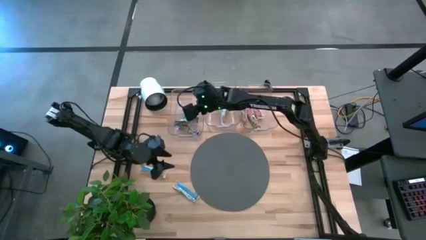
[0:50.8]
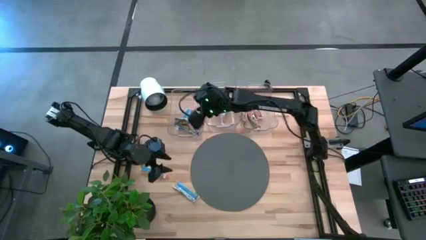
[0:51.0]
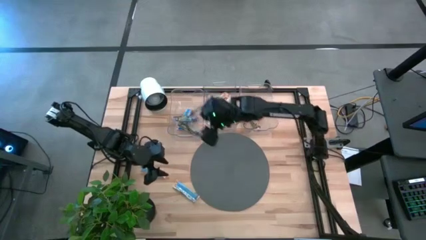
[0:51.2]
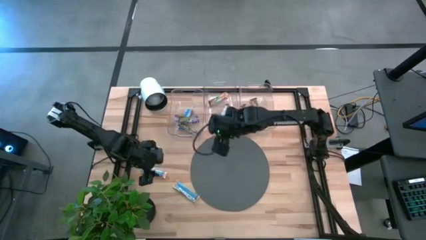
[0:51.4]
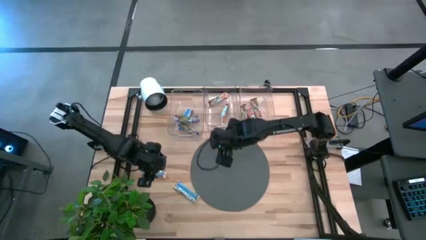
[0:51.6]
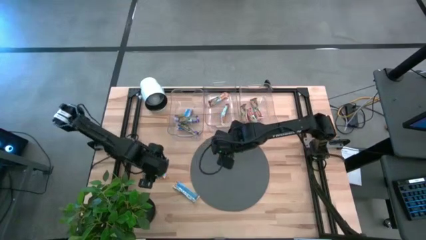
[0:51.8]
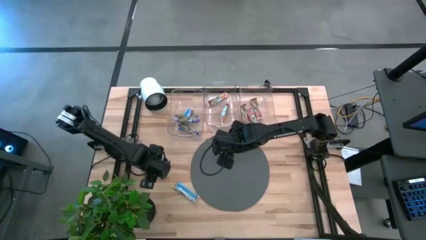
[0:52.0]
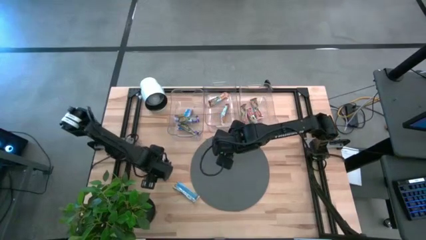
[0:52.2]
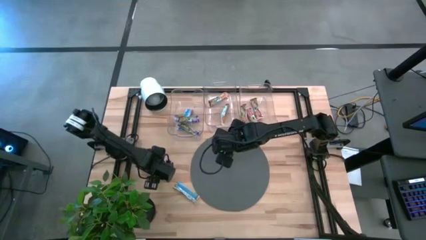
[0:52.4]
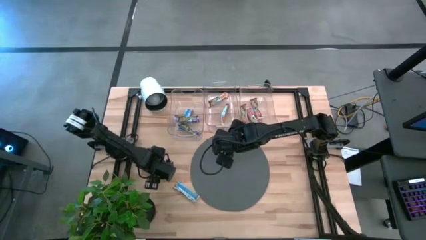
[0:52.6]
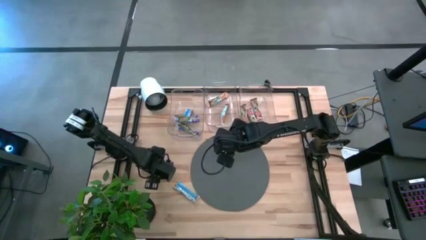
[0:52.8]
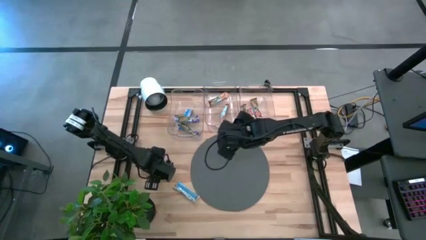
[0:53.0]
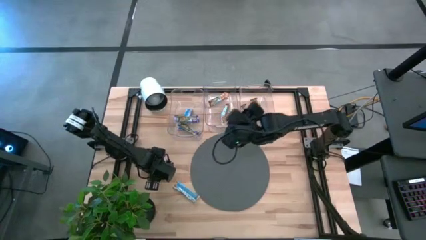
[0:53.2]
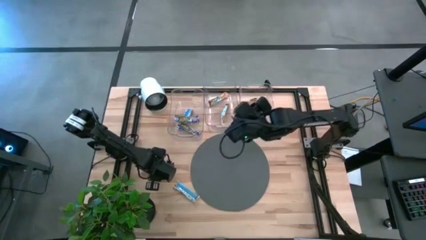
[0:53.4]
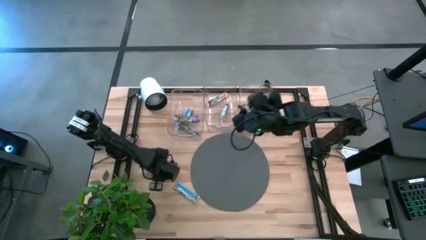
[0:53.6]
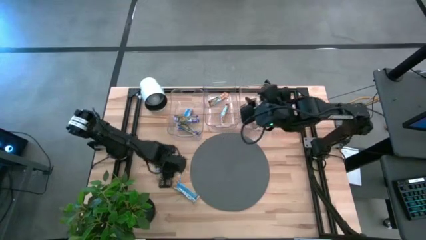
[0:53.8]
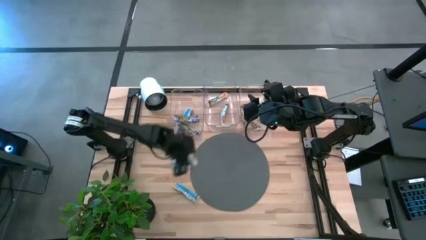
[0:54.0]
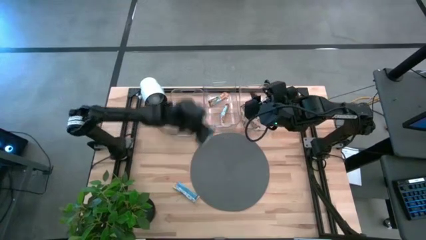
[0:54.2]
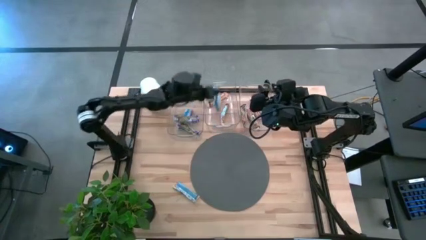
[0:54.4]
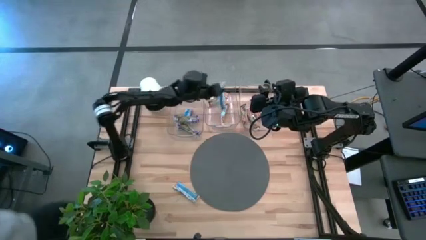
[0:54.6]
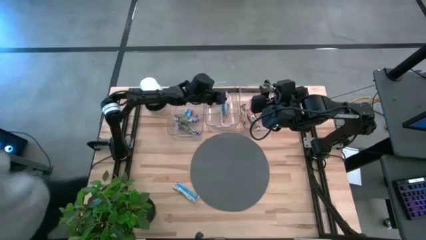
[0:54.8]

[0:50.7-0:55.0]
Task: Pick and place Granola Bars by type
Put the yellow granola bar into the middle bin

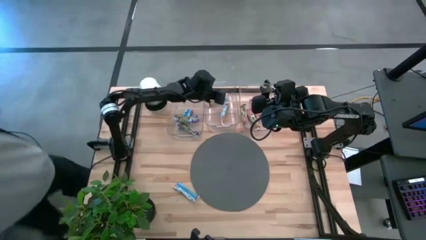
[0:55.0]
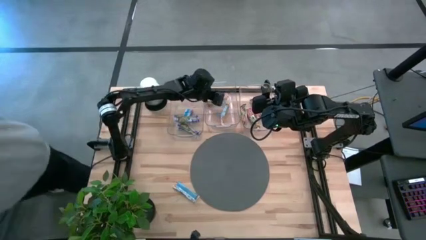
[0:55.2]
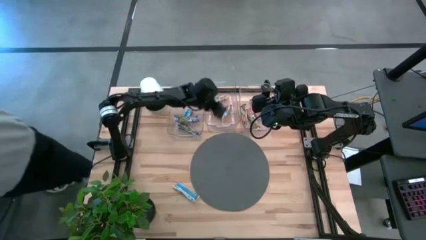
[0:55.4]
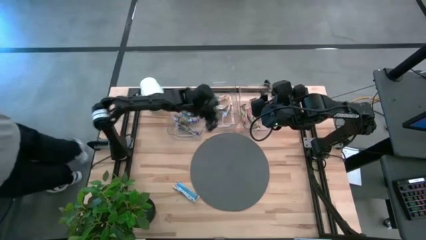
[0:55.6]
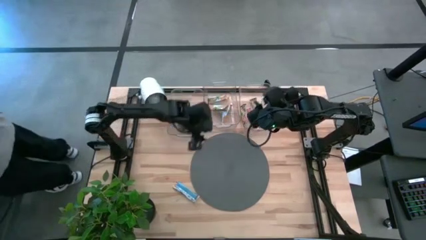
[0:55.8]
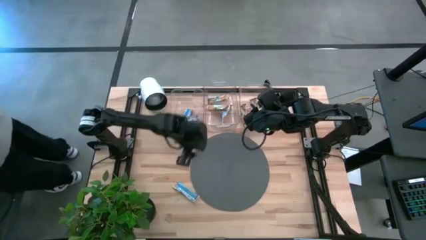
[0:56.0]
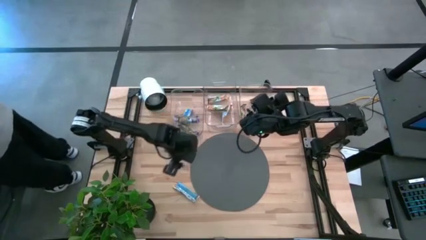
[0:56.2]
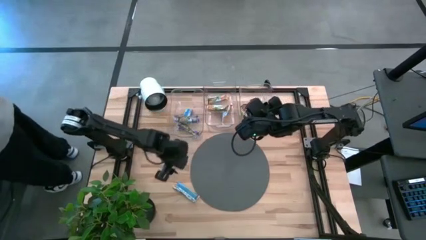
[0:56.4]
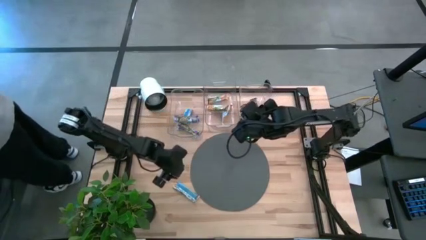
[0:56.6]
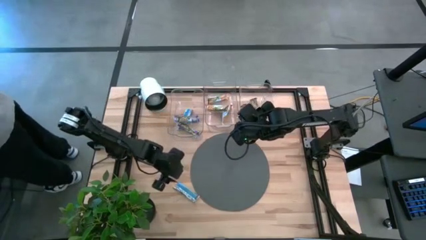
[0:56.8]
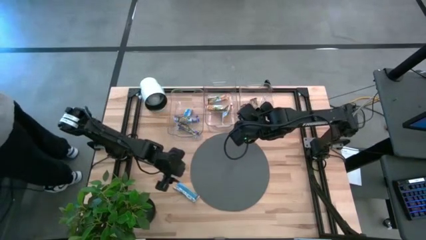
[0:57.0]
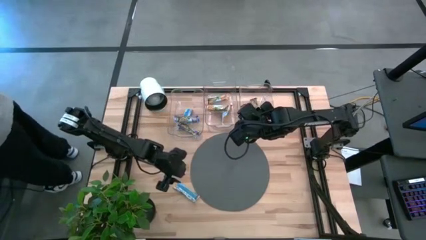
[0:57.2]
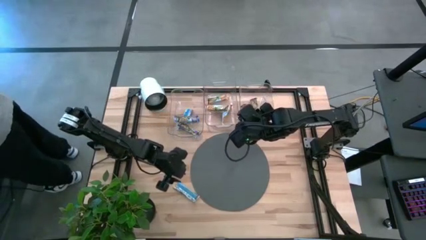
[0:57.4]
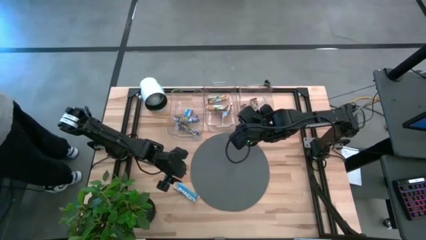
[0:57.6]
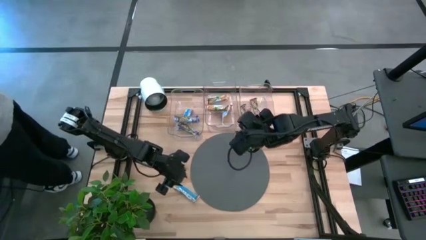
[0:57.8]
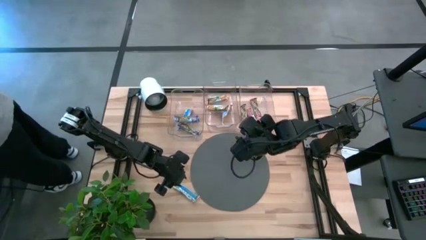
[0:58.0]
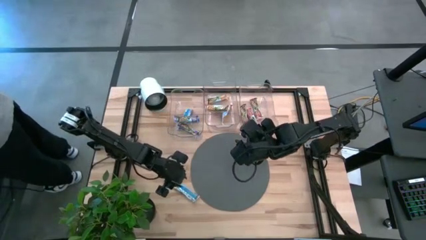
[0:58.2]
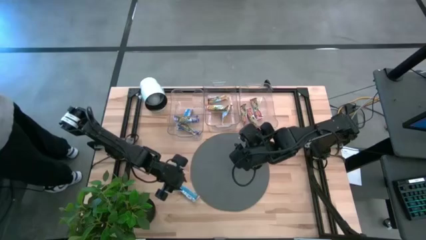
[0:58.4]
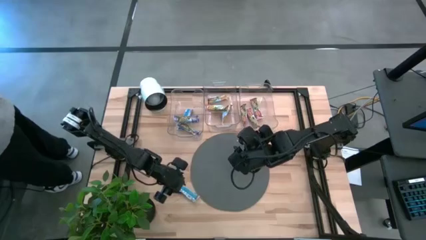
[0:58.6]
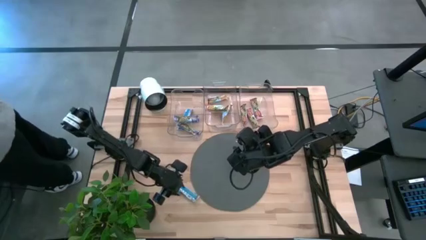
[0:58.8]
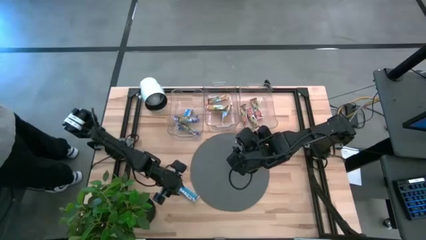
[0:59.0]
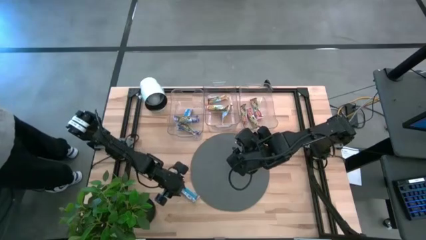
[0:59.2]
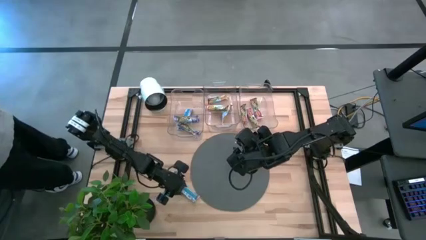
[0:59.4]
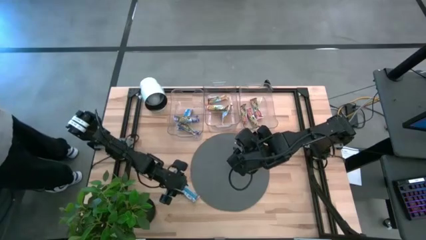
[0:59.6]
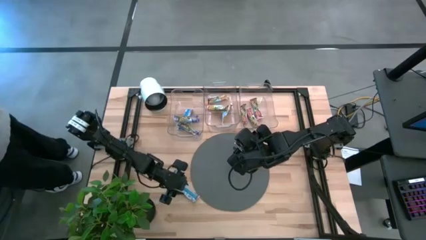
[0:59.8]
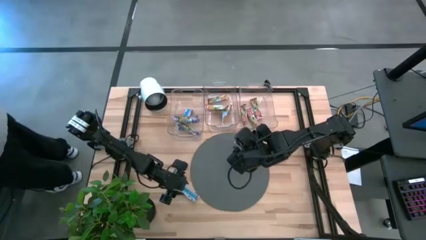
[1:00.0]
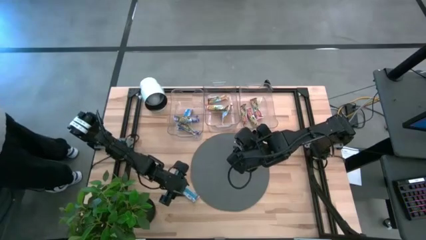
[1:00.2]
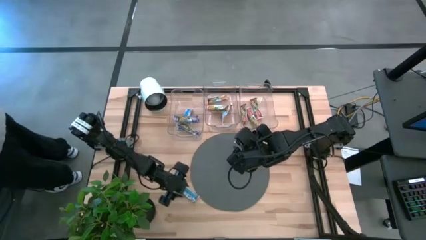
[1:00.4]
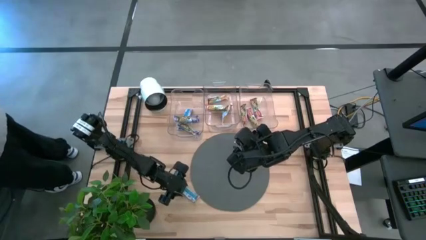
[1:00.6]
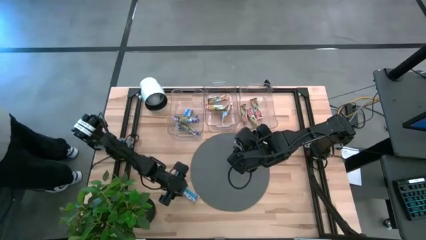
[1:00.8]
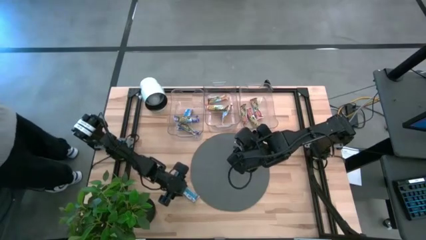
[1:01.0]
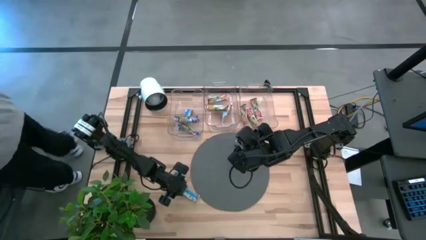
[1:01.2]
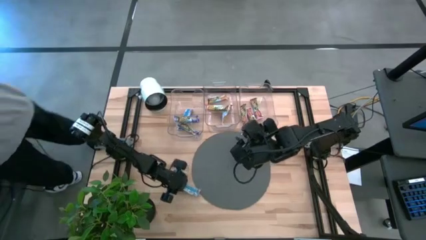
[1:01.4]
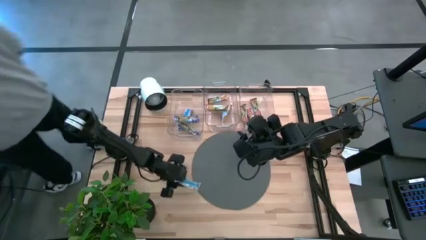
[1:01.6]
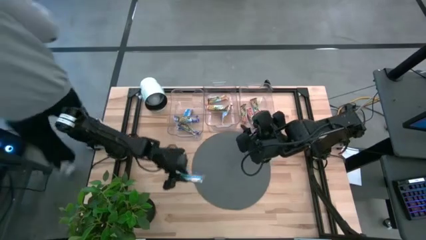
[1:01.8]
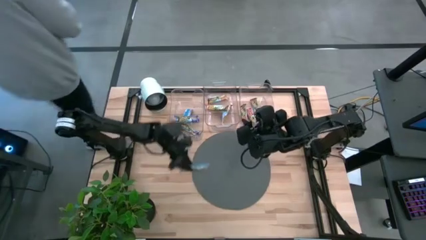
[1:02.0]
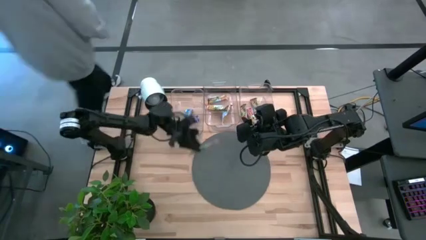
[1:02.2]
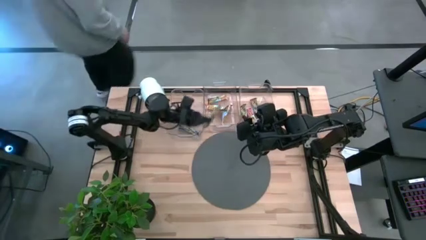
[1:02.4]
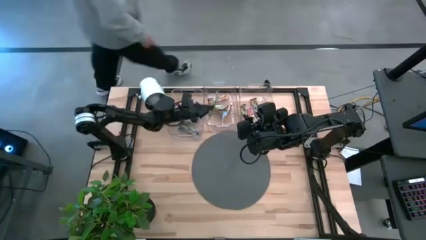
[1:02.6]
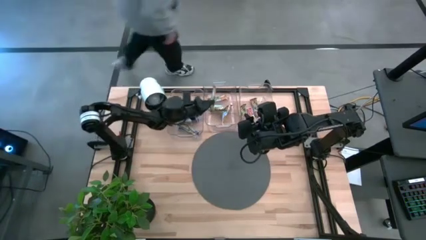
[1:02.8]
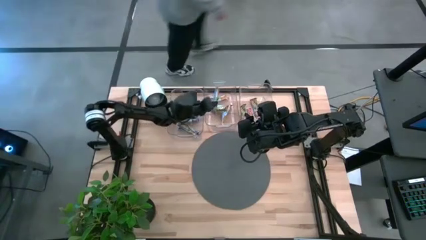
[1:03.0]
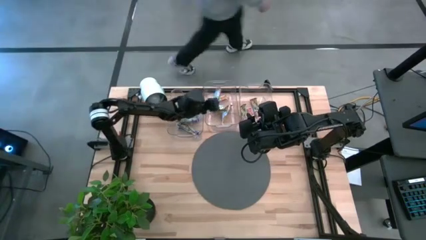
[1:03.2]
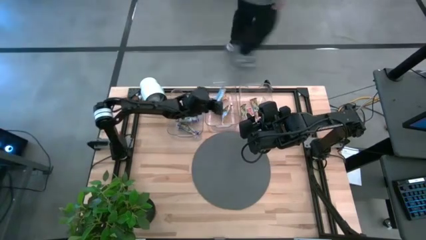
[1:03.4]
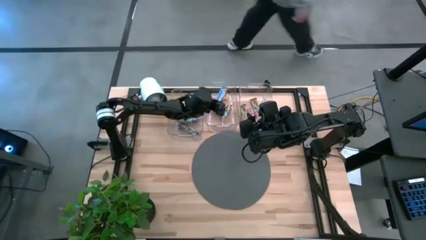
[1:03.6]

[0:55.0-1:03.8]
Put the yellow granola bar into the middle bin

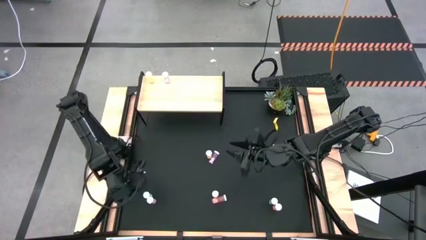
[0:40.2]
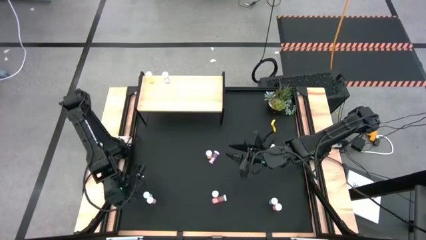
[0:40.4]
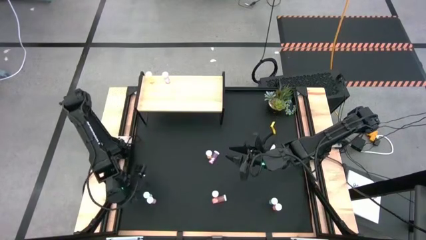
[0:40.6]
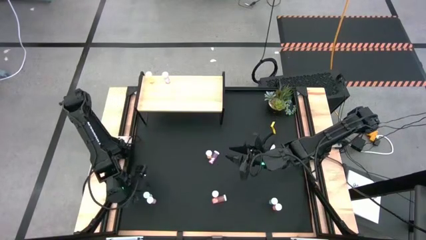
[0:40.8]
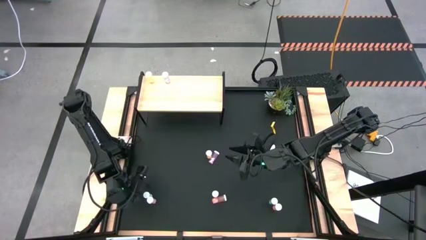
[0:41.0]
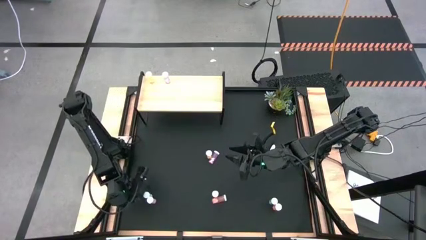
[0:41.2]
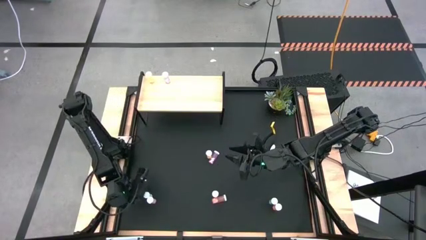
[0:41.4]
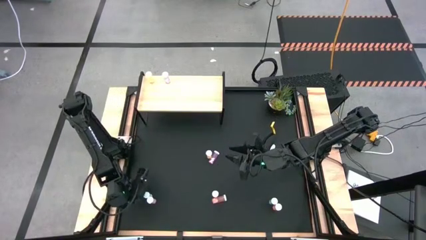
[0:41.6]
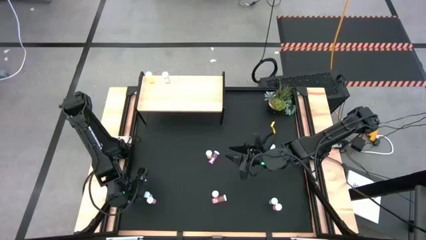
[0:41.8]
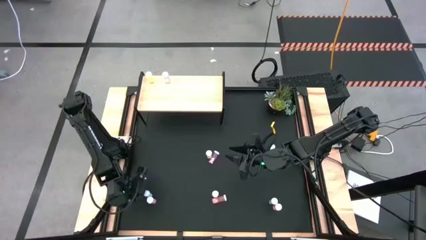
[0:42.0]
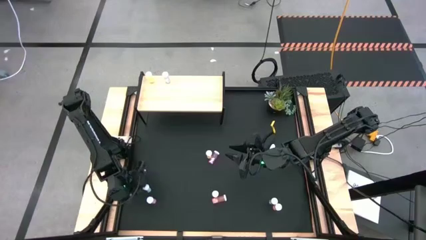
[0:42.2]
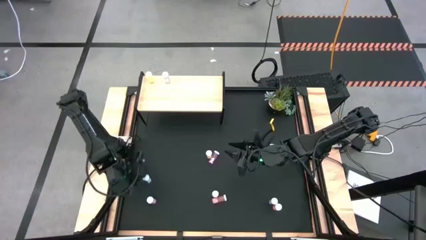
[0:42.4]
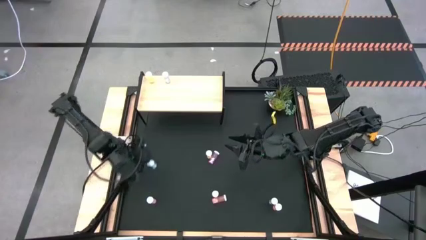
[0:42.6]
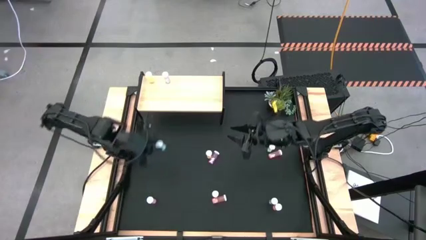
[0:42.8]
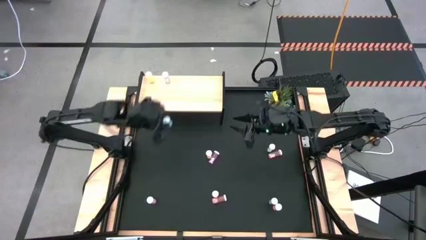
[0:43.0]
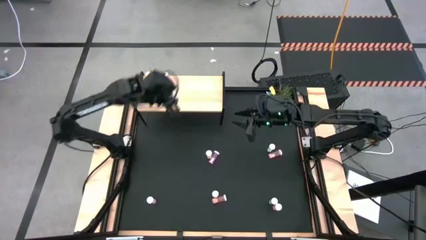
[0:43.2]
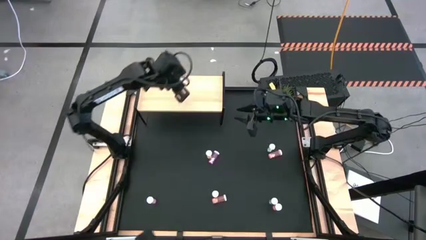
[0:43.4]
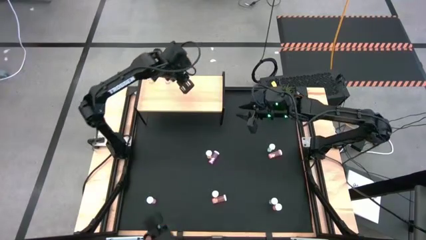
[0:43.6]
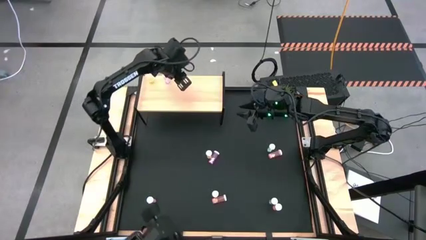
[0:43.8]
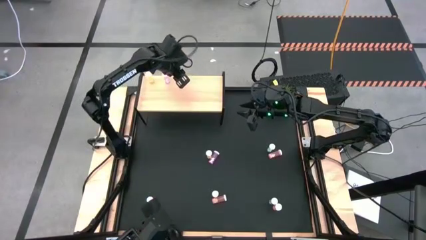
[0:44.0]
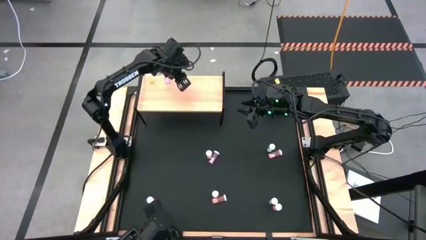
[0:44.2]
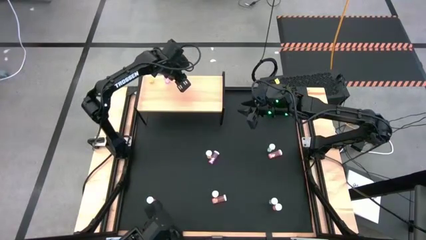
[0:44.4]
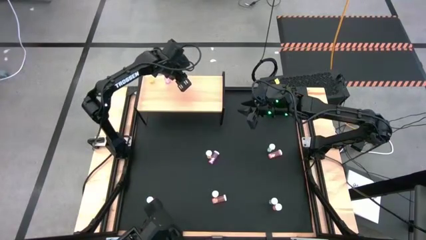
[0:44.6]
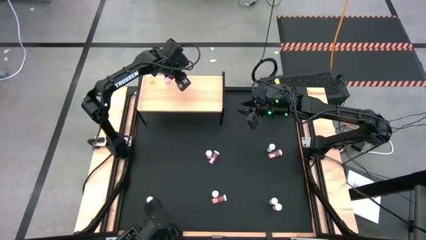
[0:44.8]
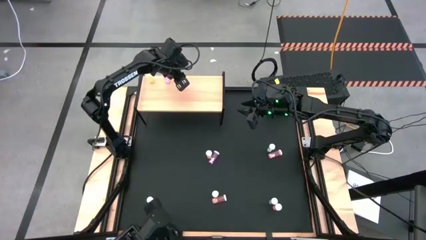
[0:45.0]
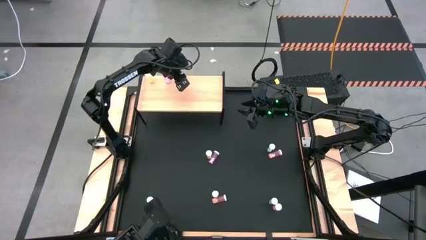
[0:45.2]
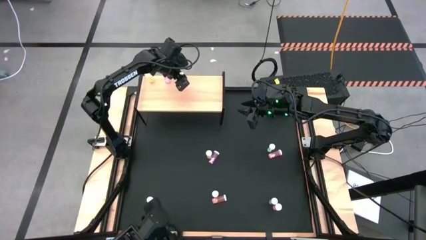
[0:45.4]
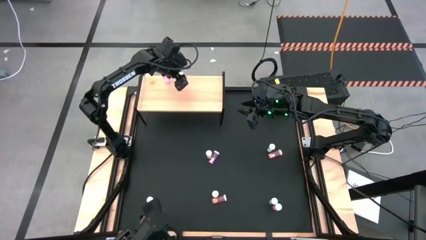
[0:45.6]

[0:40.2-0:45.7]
Task: Pick and place medicine bottles onto shelf by color
Put the bottom left blue medicine bottle on the shelf
